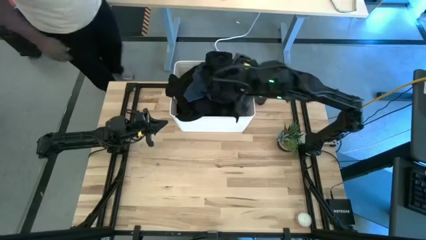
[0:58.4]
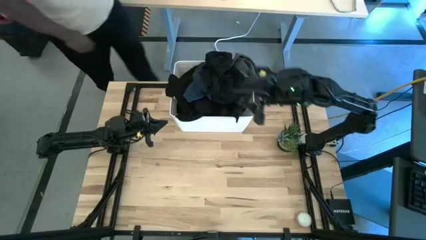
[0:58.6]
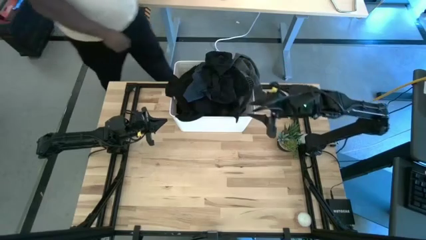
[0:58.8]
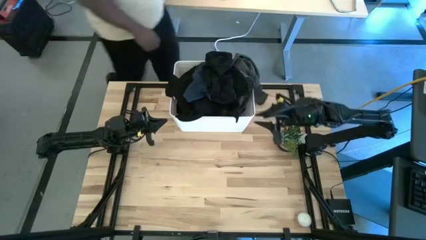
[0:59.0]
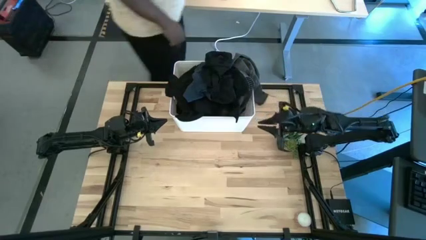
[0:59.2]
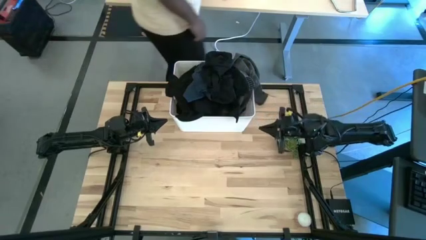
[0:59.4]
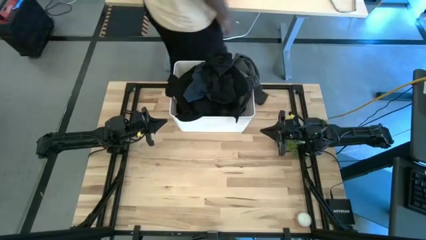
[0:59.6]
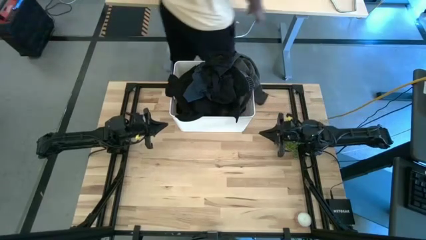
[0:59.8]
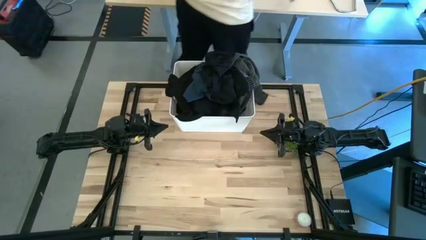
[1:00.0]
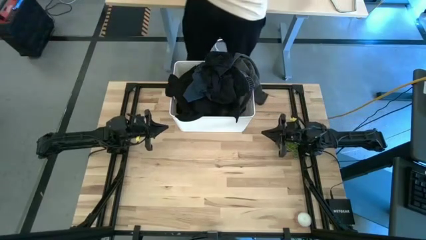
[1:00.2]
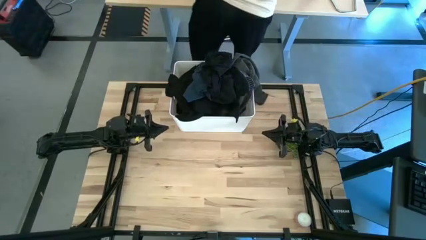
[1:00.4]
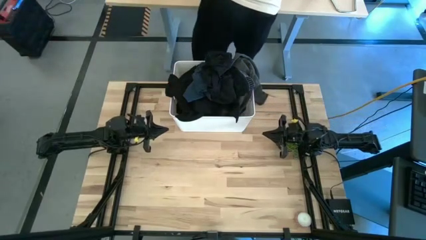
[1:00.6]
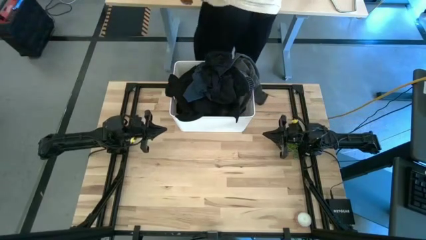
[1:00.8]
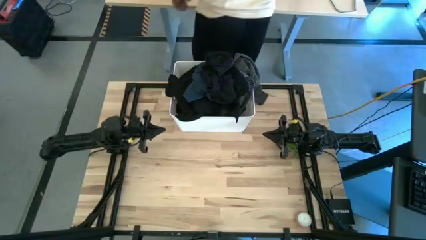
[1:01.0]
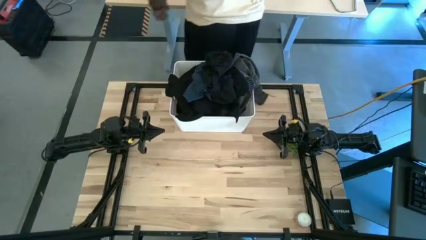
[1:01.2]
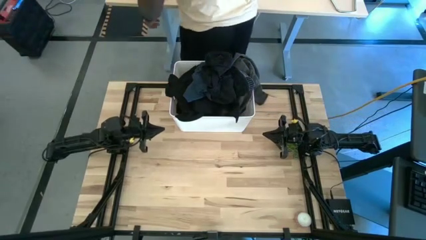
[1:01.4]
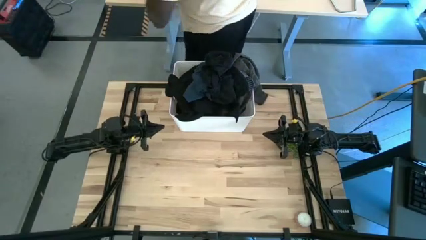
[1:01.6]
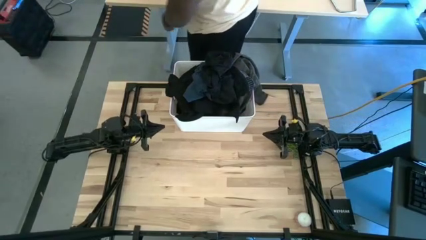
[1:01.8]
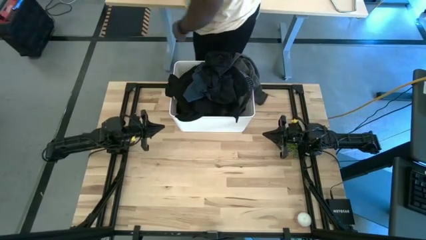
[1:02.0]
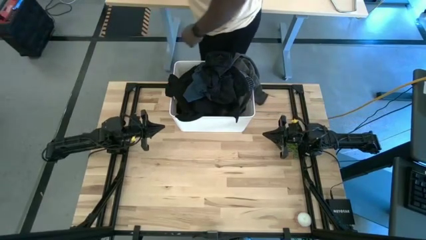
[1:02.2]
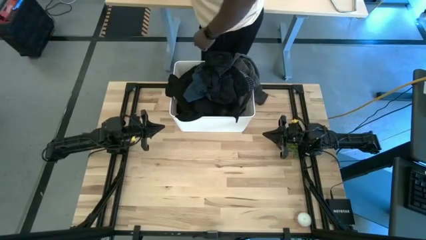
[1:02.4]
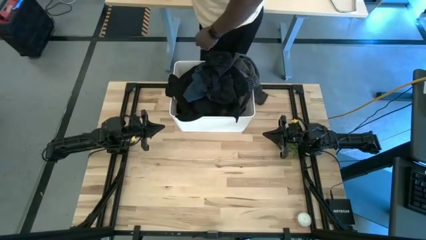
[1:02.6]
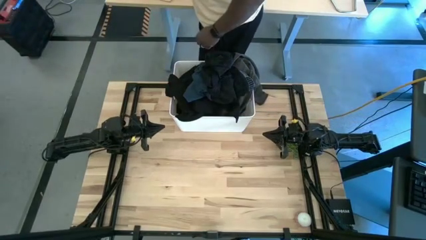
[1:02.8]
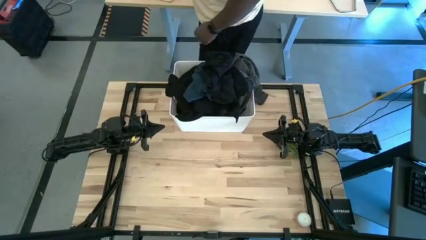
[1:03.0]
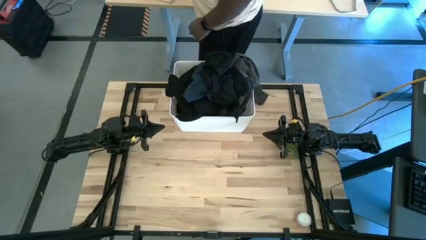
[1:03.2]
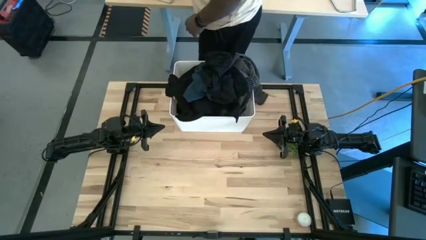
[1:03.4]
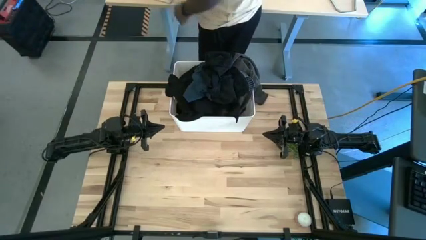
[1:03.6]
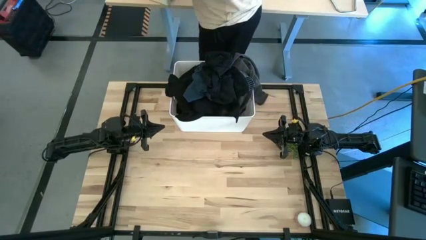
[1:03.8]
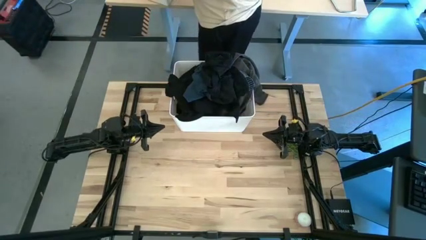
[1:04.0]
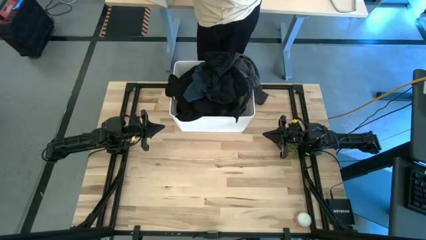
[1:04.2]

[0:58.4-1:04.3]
Task: Sort clothes
Return to Home Position

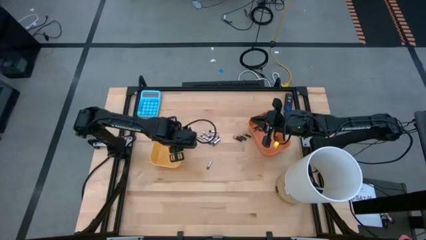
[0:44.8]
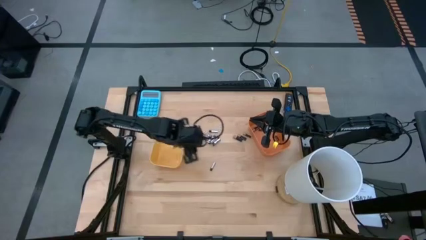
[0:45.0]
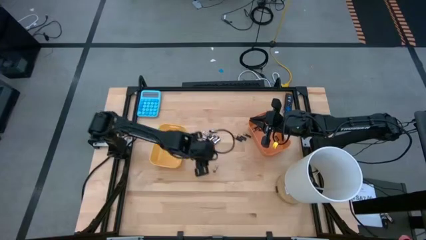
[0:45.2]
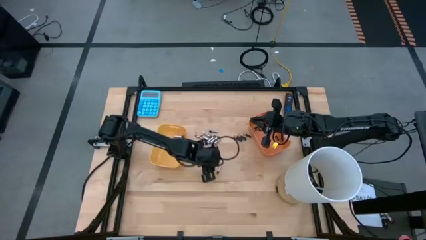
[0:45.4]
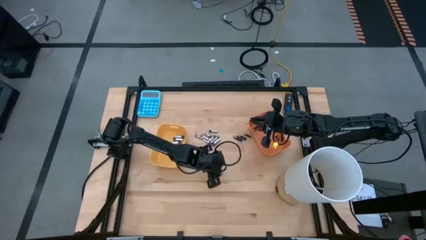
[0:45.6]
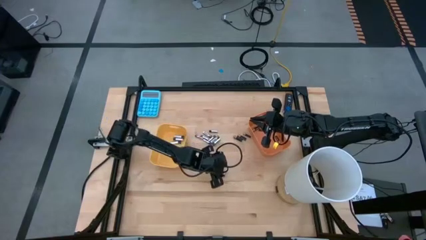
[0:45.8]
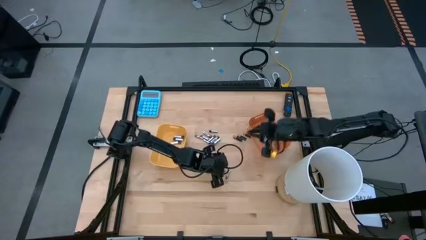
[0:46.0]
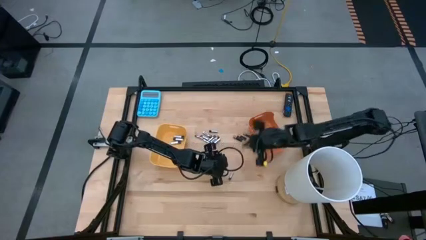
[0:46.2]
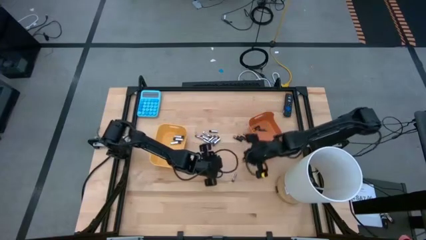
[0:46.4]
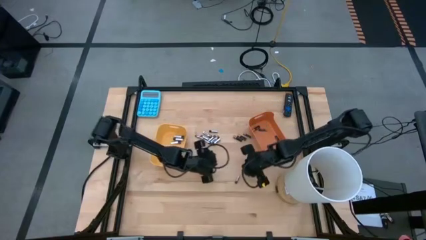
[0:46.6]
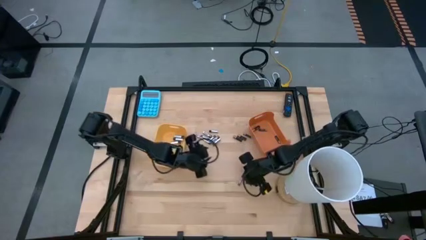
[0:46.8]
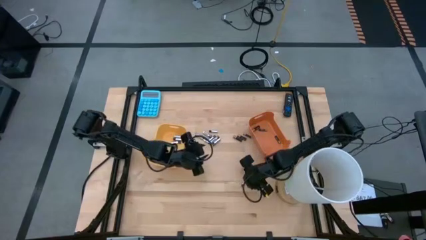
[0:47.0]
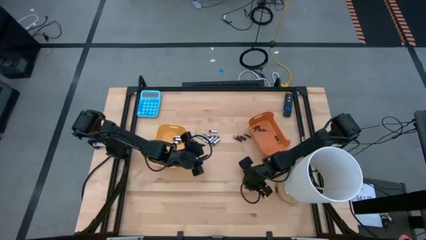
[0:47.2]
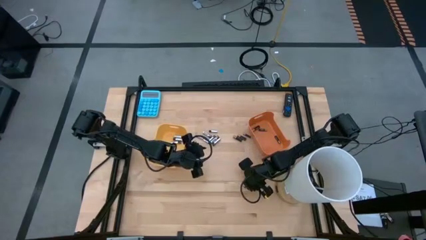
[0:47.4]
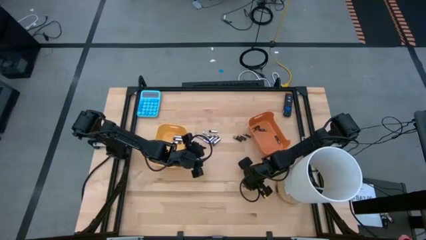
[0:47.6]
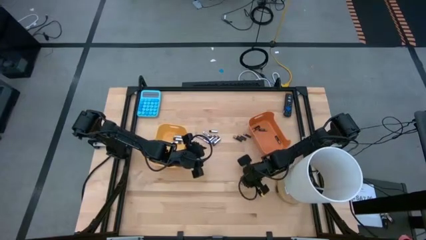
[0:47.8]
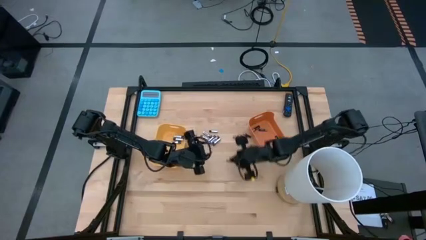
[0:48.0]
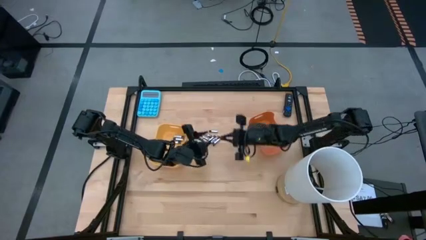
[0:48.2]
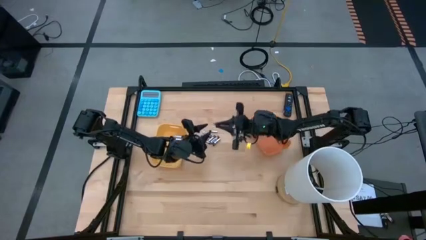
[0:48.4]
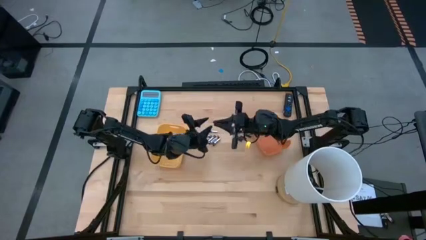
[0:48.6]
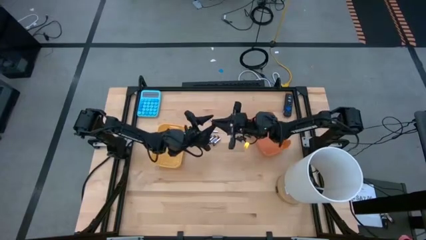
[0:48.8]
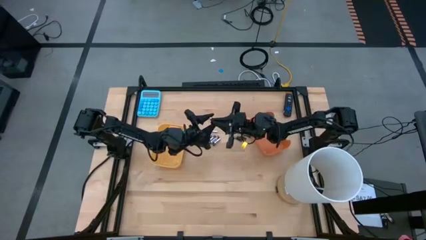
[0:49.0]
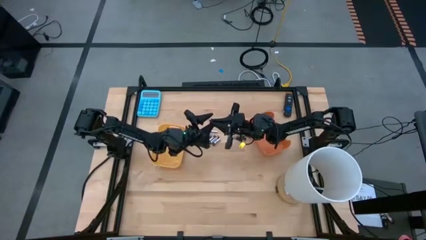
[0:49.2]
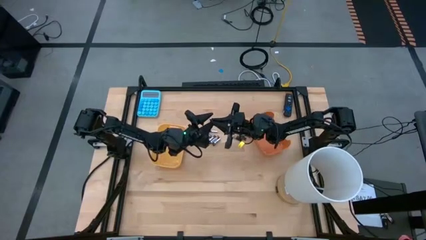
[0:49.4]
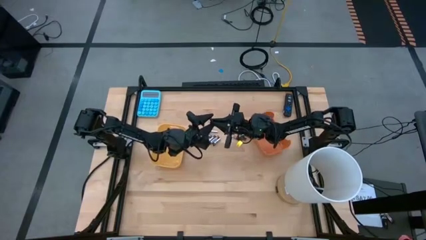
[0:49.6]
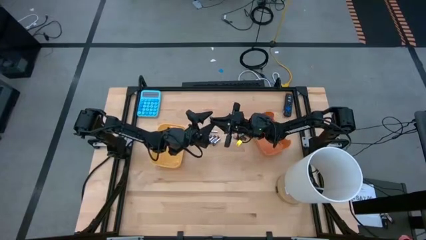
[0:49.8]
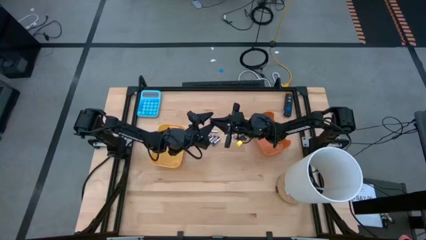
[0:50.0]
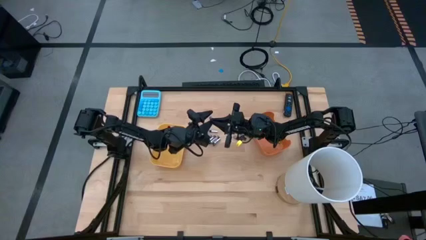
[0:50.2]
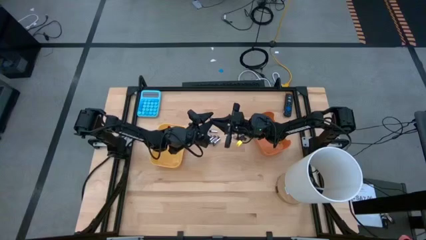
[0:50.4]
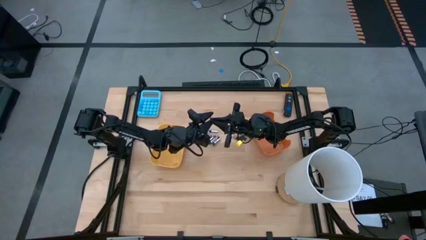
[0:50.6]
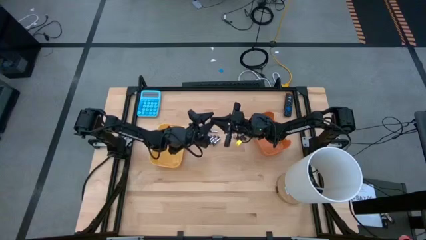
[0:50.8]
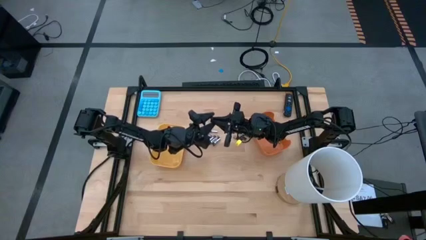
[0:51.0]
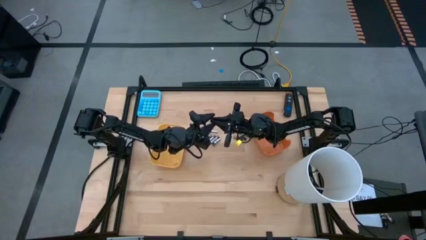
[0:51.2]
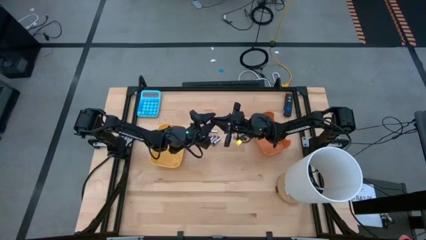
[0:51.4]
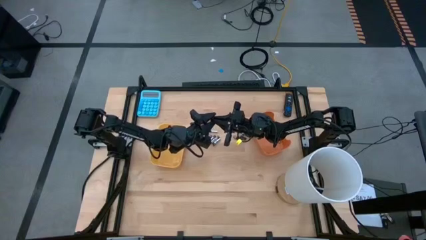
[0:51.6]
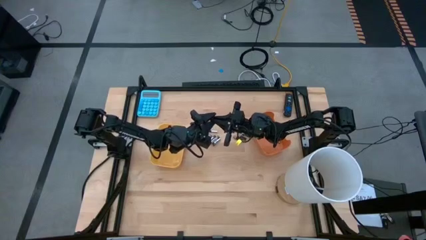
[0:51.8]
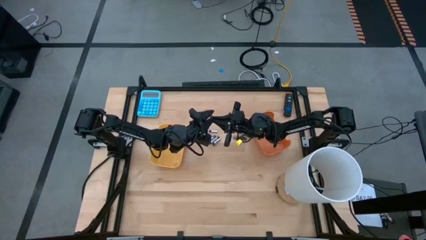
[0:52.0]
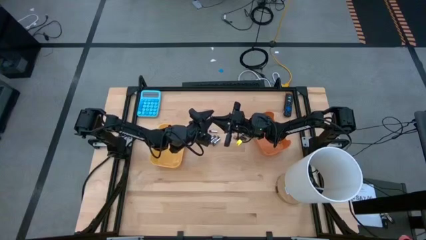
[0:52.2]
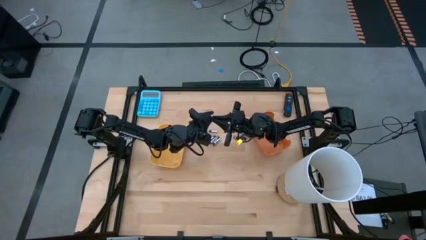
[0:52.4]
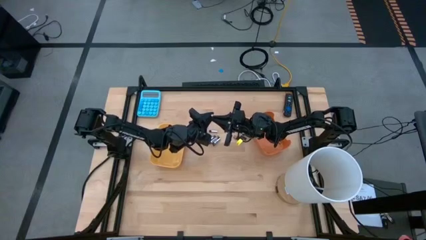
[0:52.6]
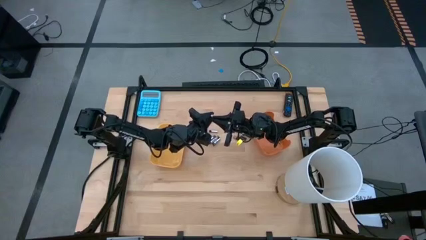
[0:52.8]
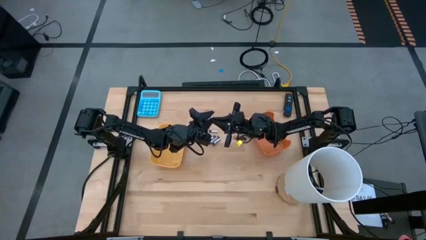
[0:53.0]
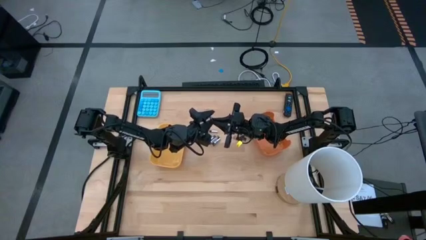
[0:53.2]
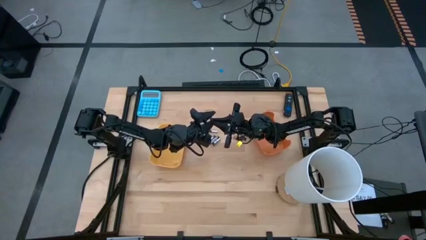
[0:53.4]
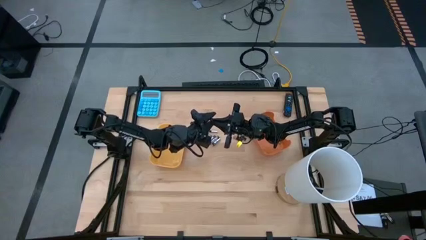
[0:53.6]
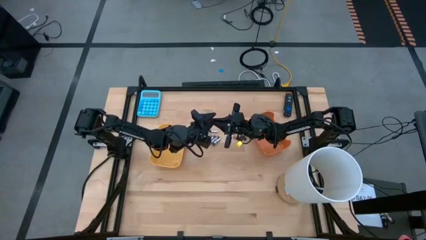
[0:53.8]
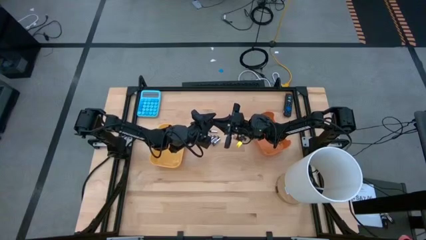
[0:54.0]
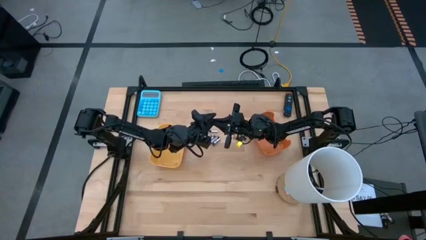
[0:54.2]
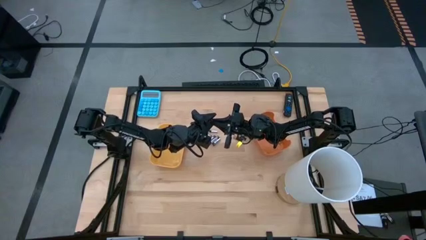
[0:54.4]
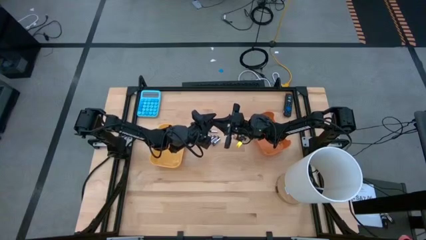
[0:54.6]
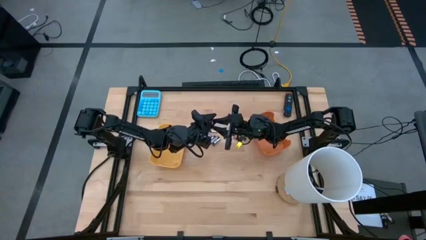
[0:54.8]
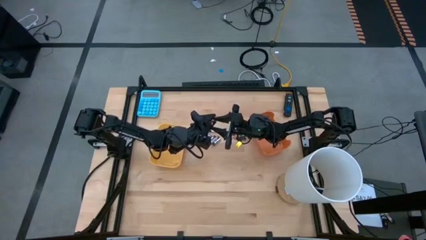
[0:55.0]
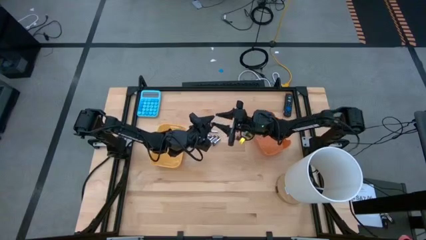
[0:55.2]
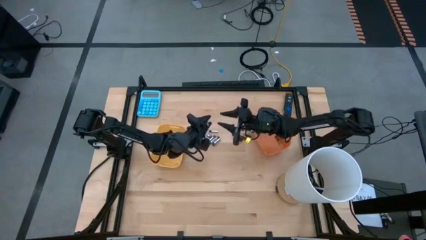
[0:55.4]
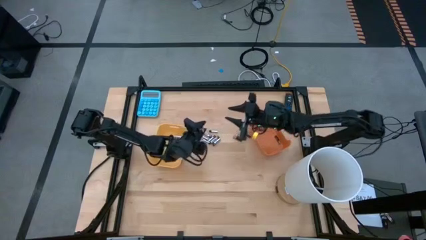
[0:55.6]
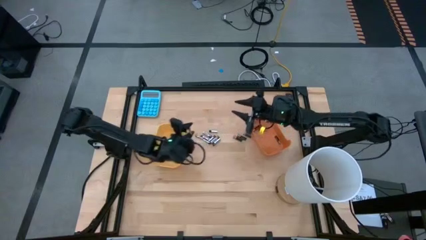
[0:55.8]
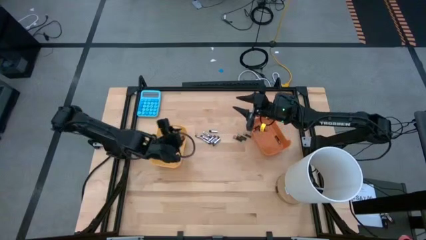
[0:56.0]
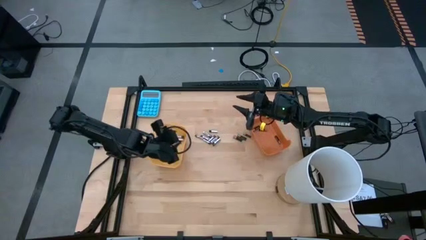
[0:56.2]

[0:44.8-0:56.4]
Task: Sort batteries
Put the silver battery into the yellow bin
